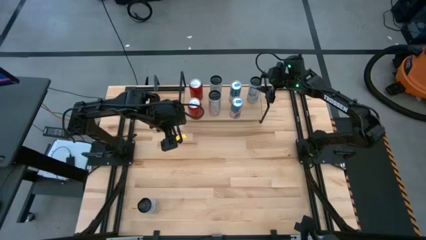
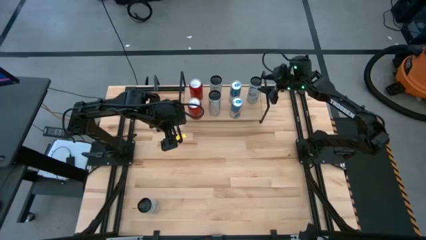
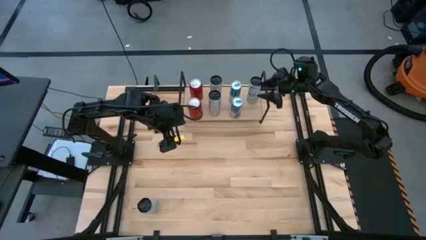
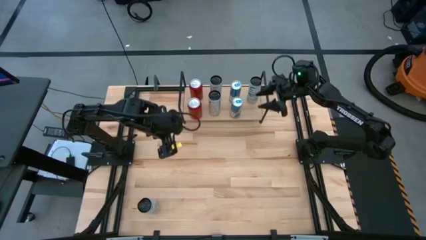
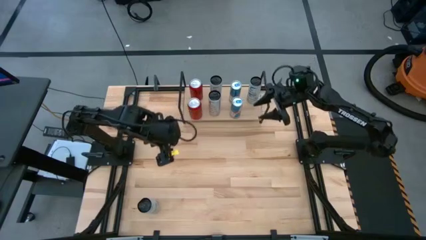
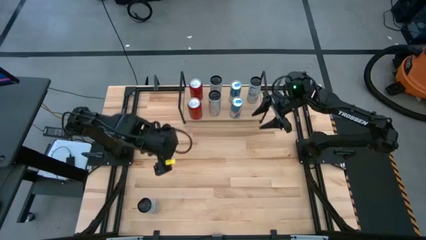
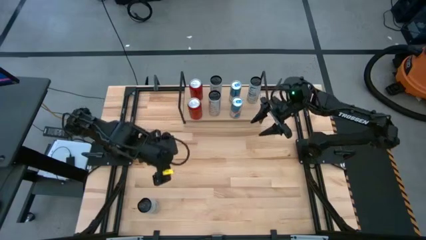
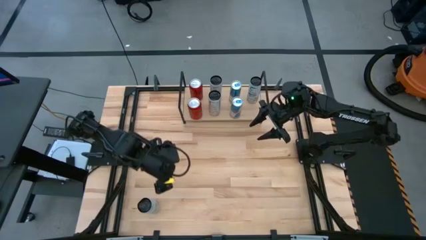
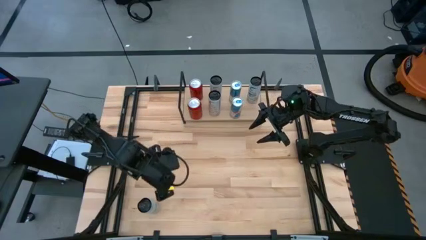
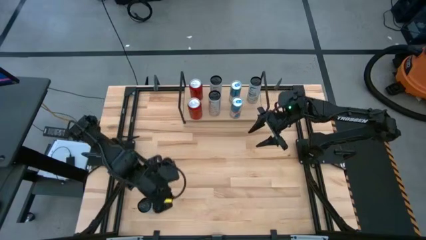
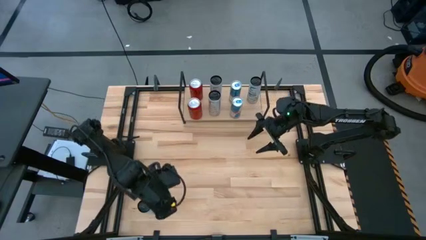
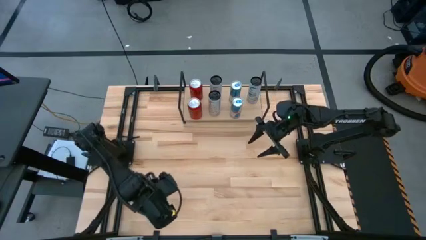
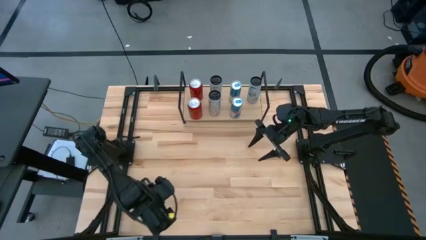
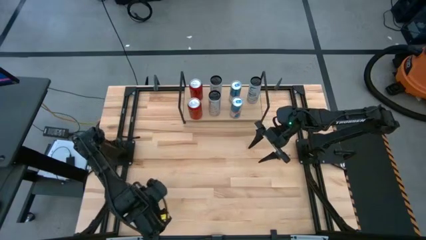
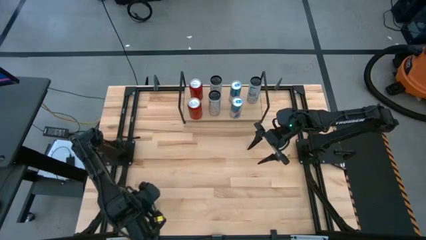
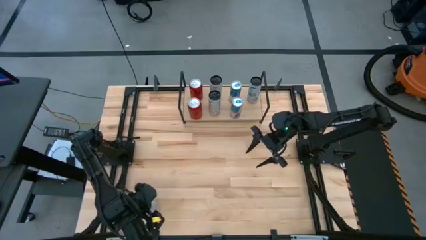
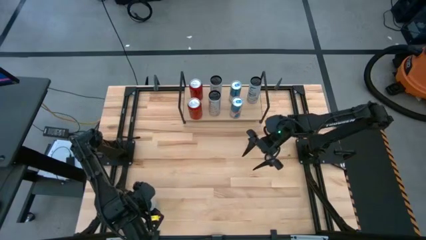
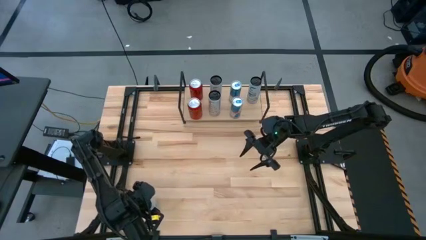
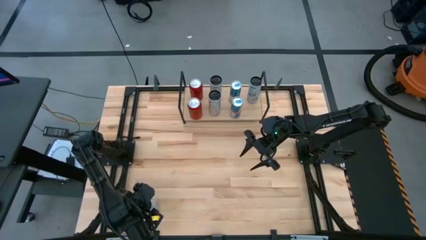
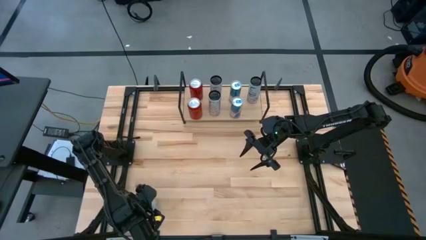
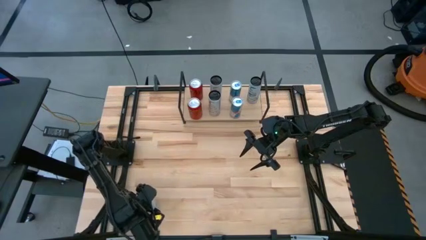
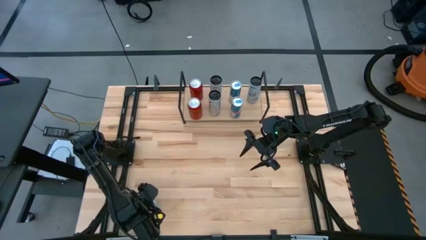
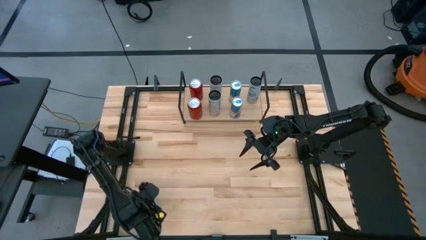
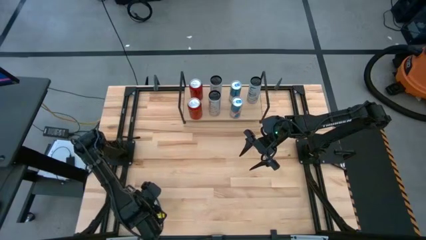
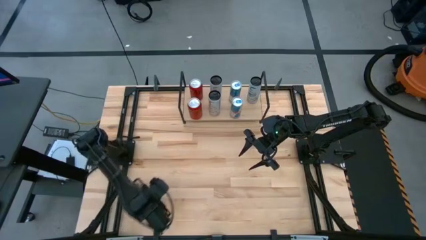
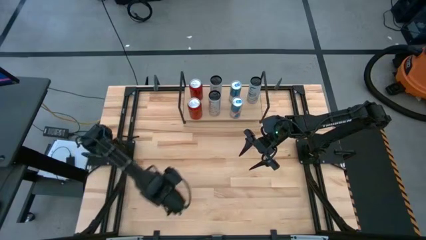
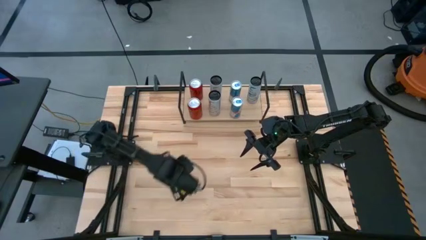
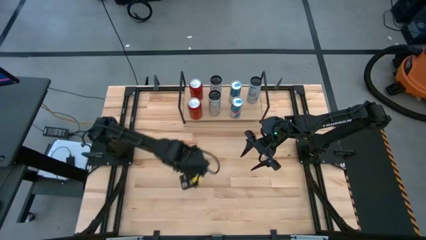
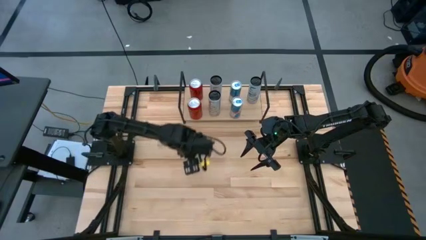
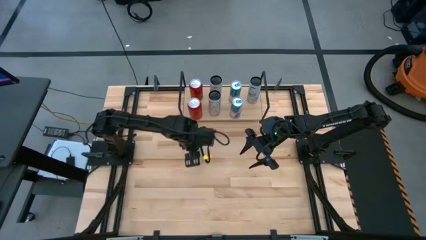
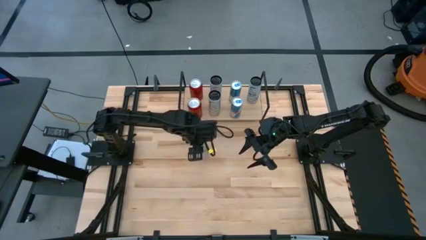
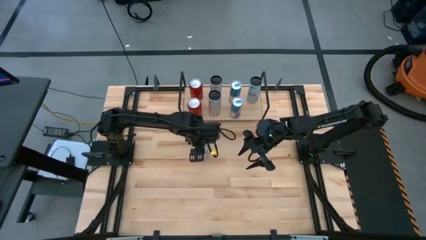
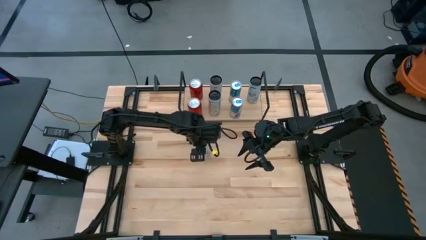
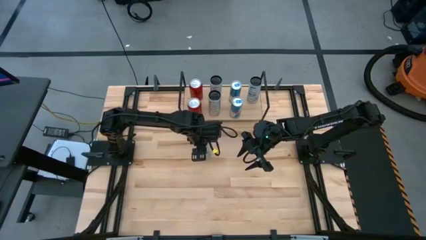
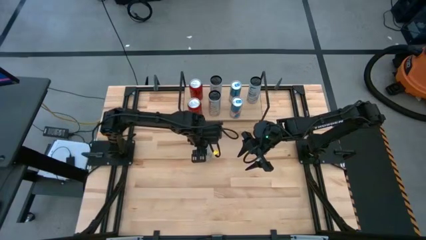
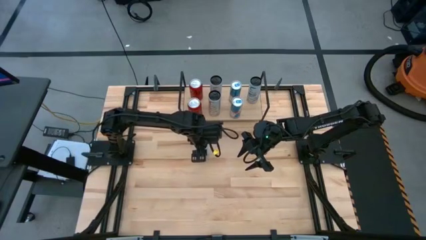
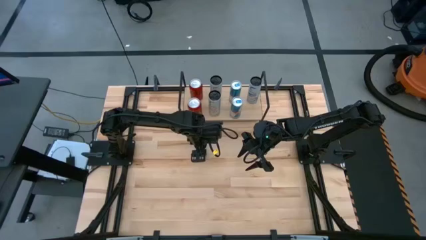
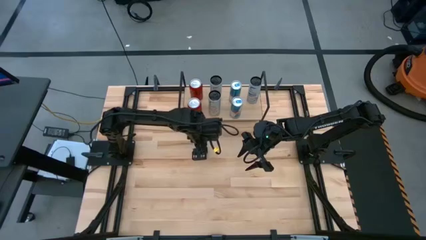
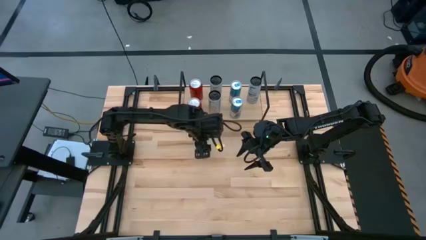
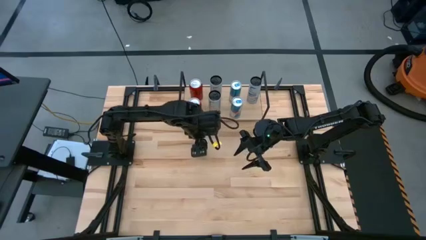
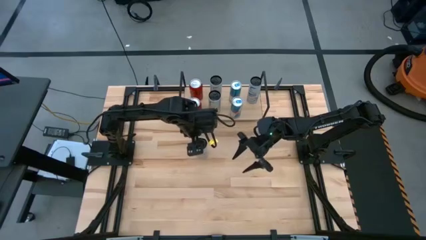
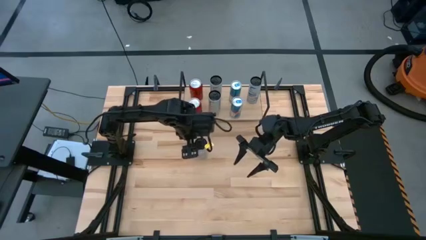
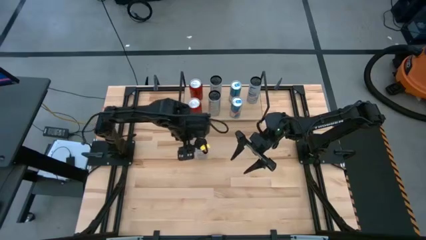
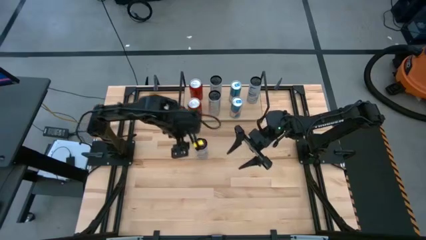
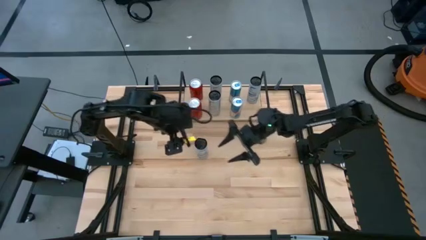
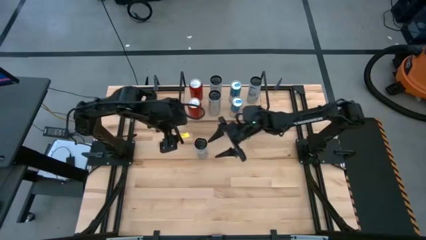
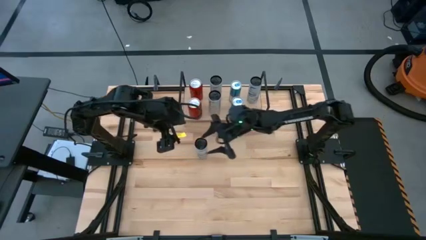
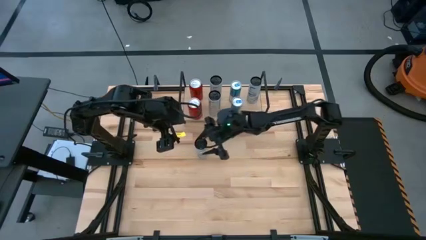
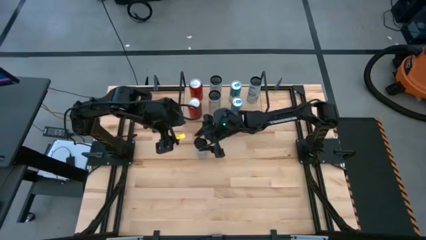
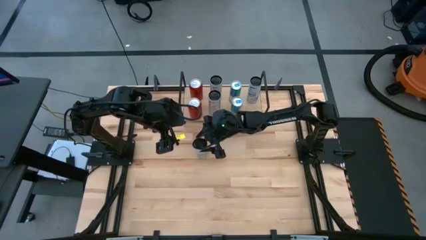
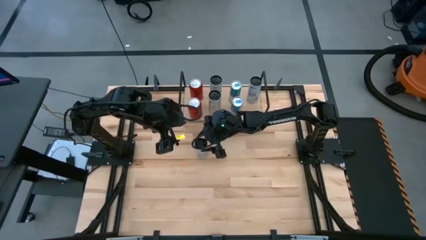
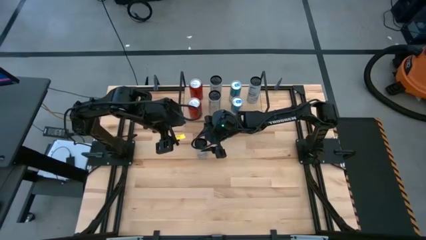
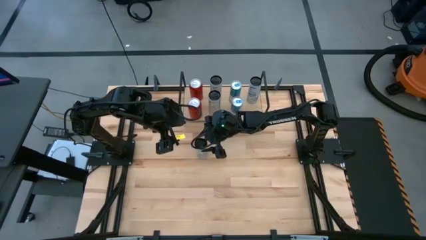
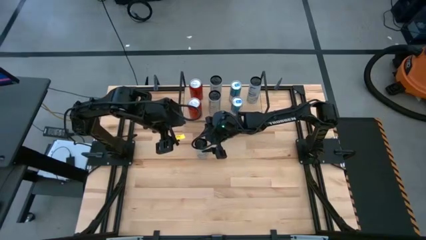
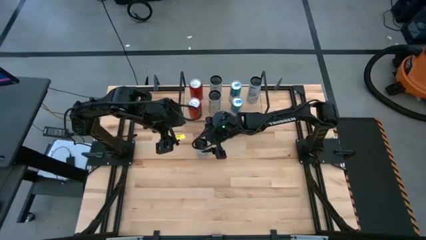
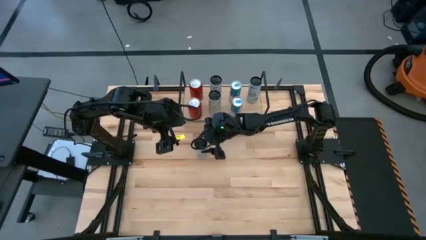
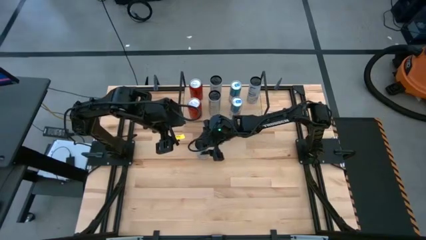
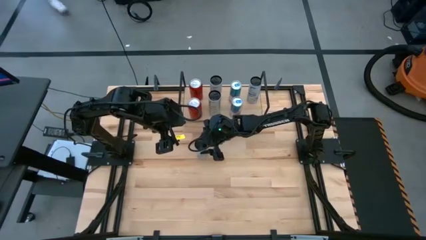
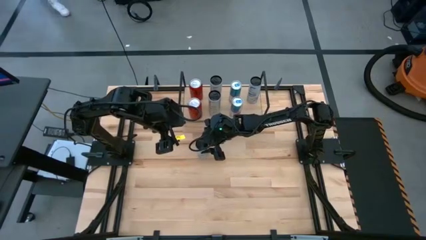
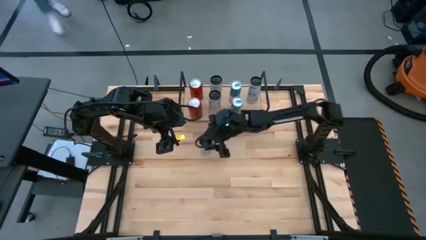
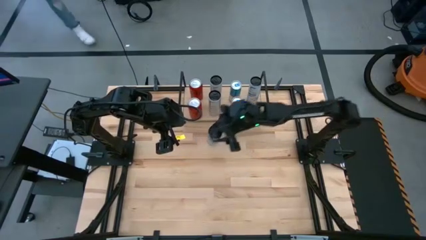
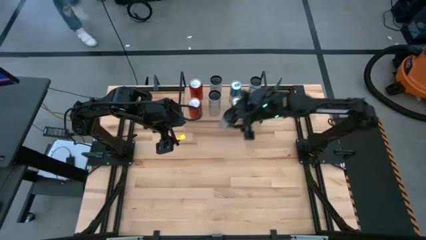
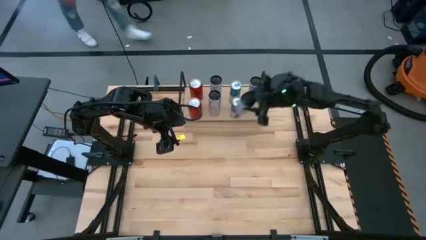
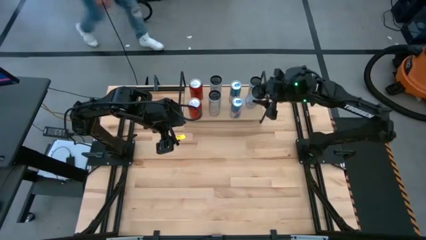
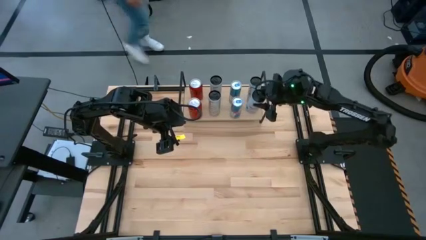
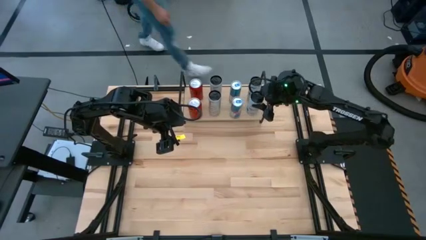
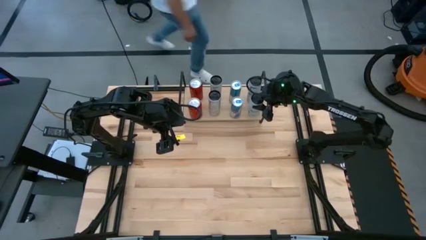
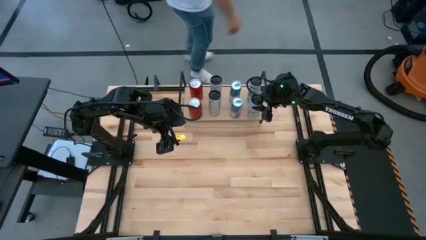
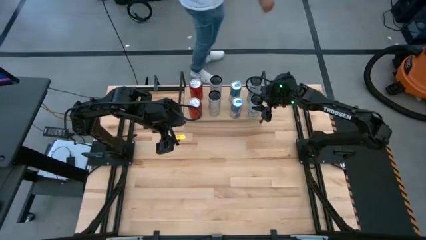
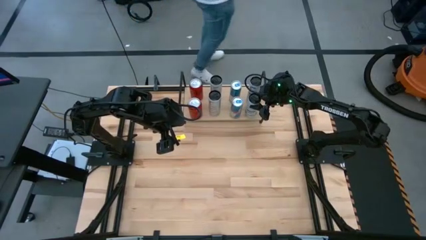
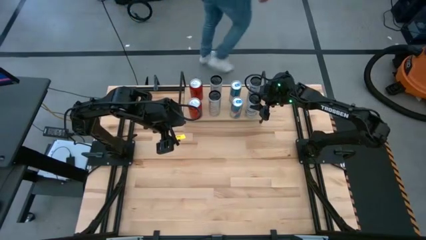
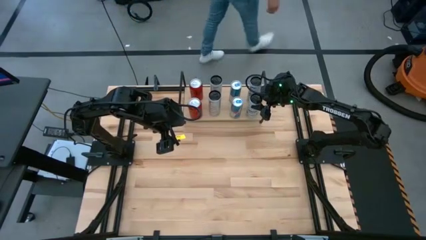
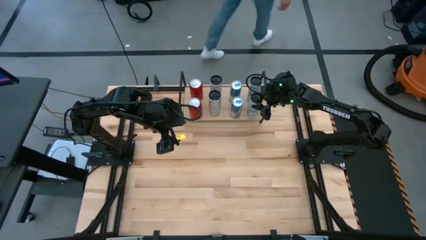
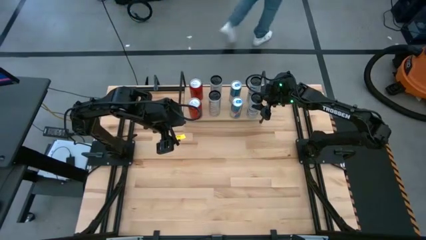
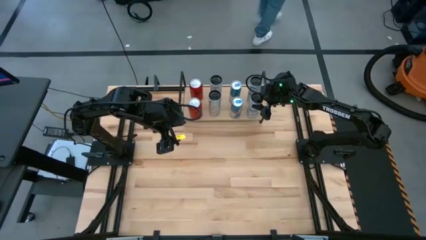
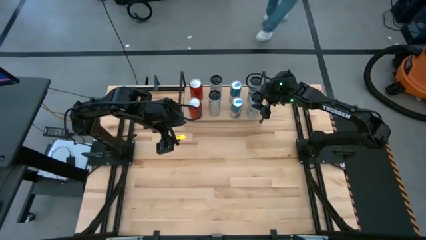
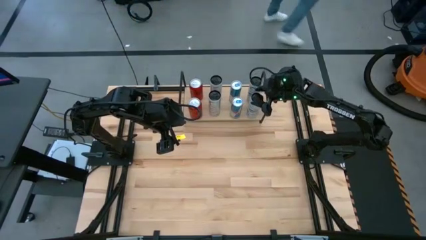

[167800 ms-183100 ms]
Task: Place canned beverage on shelf
Put the white blue soda can aligned with the other white blue soda can on the shelf
